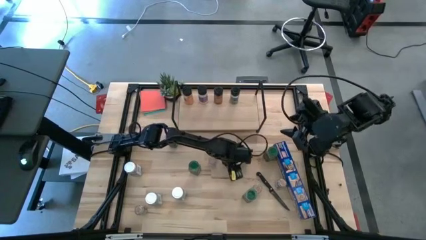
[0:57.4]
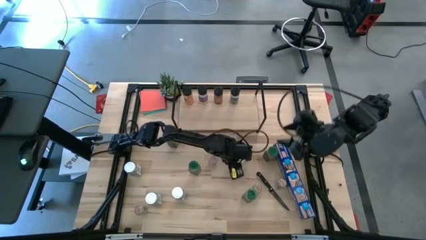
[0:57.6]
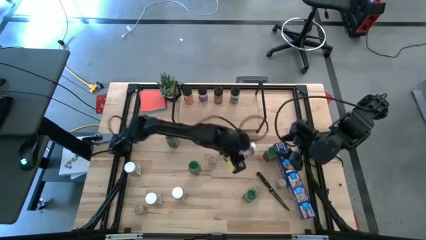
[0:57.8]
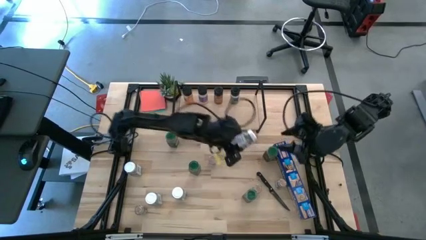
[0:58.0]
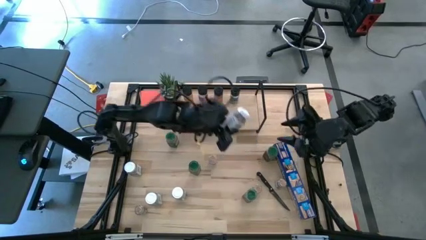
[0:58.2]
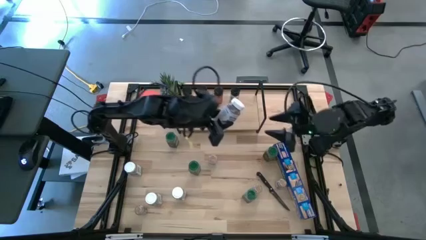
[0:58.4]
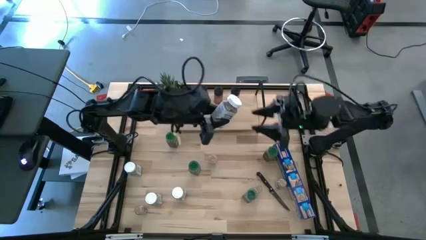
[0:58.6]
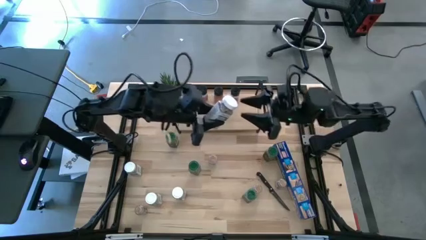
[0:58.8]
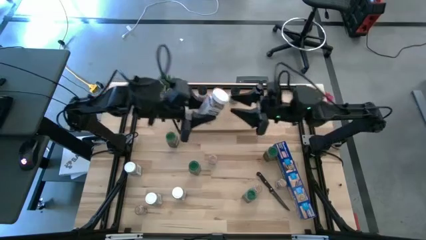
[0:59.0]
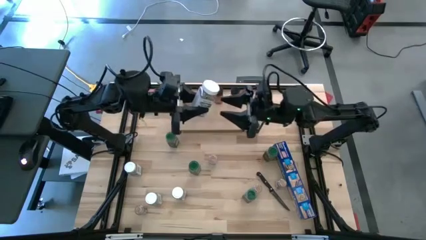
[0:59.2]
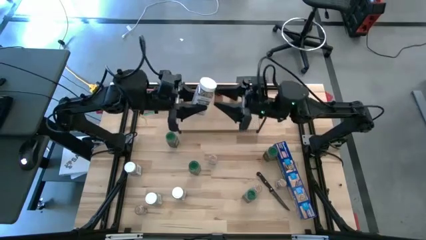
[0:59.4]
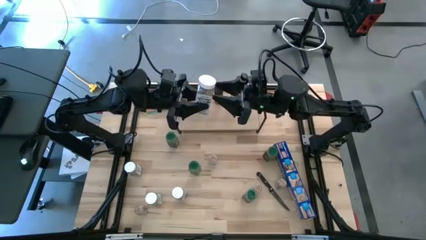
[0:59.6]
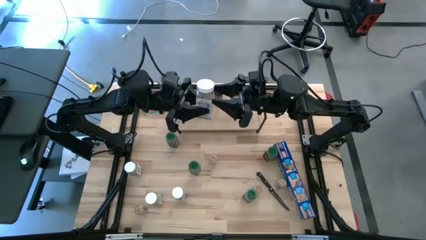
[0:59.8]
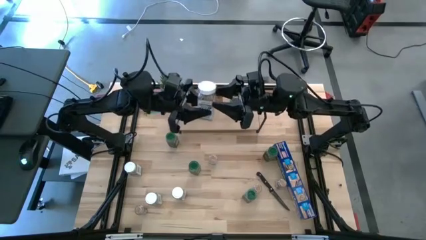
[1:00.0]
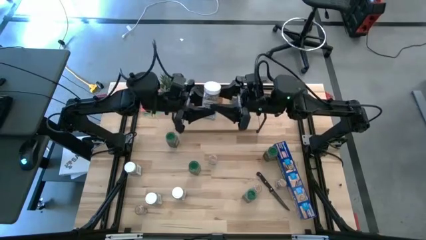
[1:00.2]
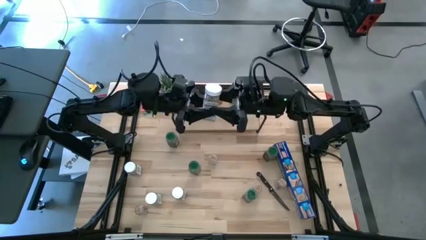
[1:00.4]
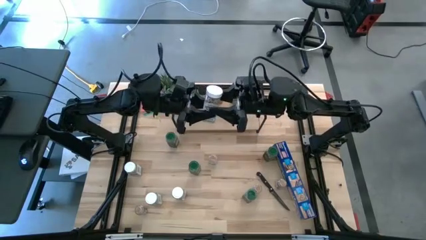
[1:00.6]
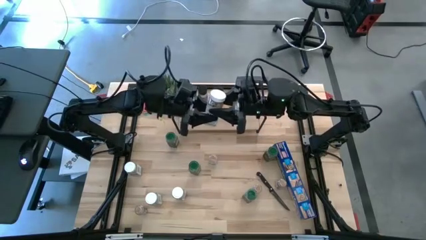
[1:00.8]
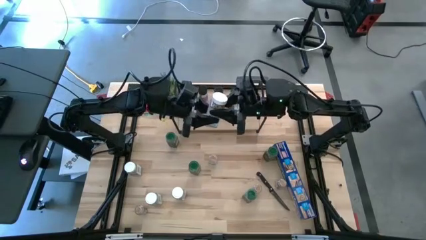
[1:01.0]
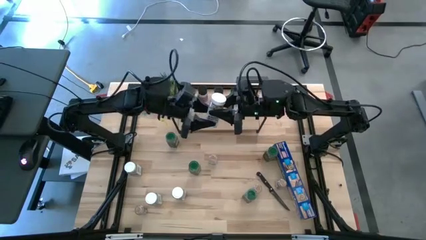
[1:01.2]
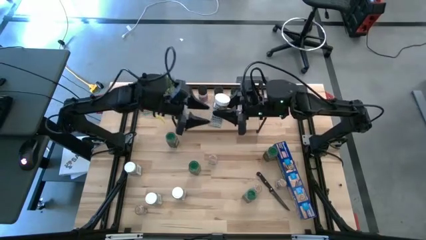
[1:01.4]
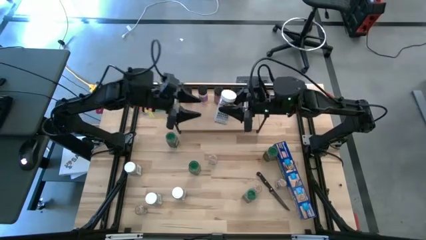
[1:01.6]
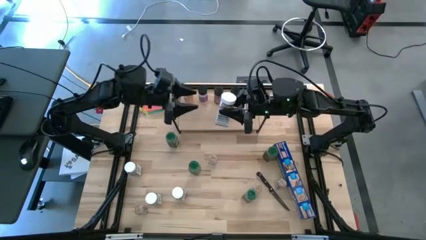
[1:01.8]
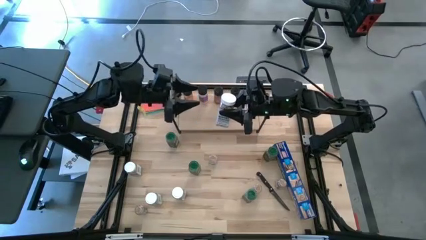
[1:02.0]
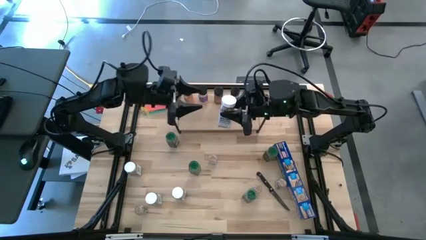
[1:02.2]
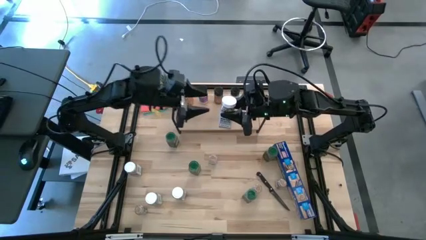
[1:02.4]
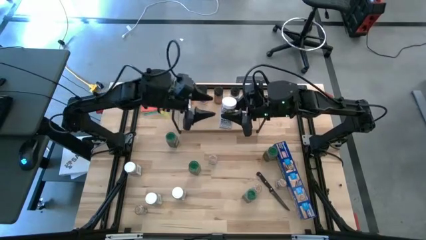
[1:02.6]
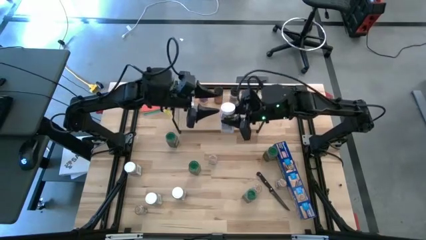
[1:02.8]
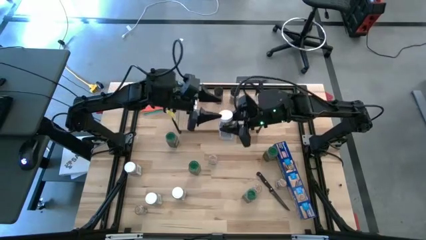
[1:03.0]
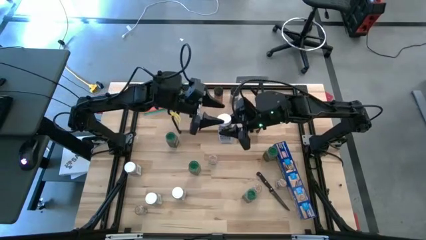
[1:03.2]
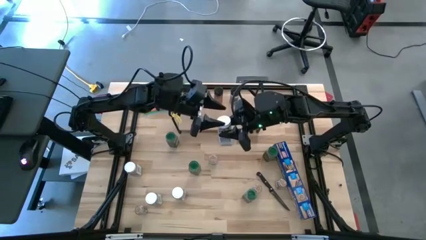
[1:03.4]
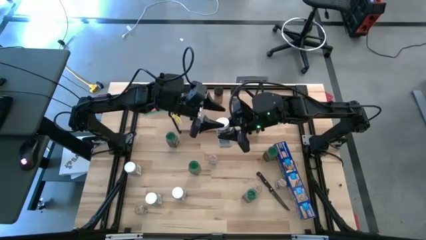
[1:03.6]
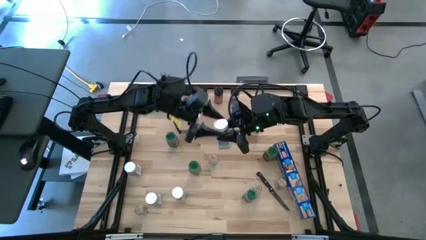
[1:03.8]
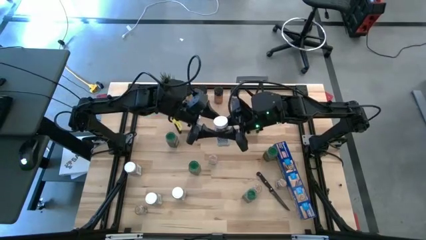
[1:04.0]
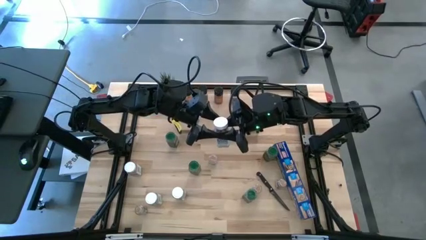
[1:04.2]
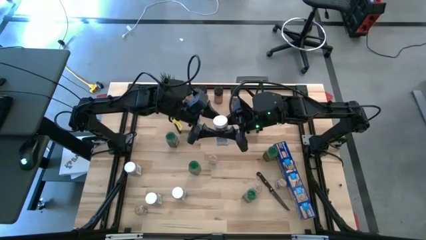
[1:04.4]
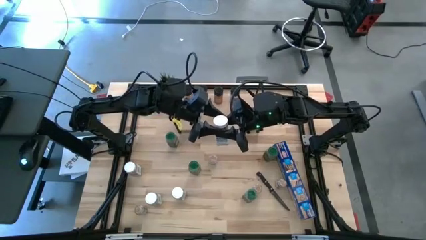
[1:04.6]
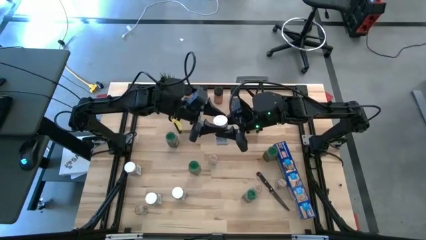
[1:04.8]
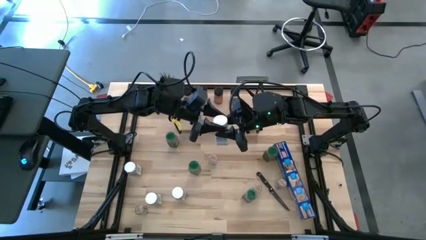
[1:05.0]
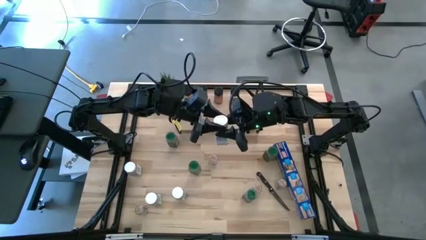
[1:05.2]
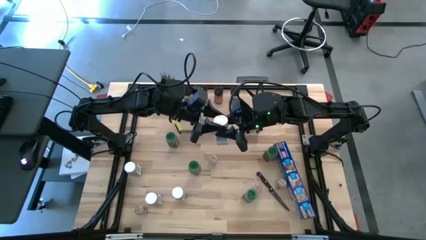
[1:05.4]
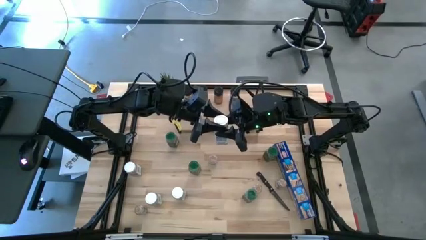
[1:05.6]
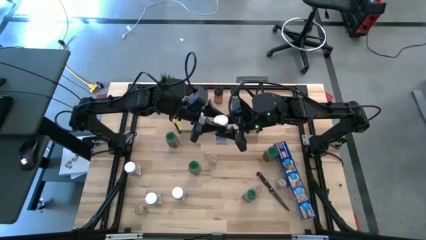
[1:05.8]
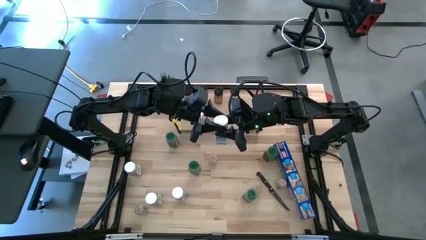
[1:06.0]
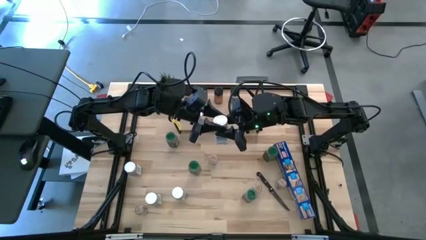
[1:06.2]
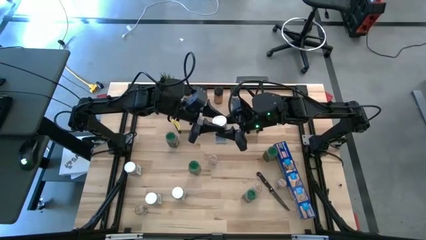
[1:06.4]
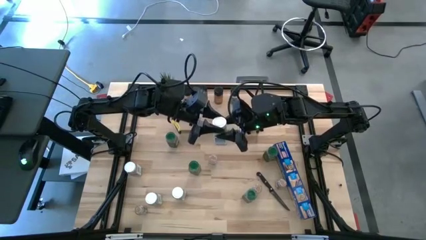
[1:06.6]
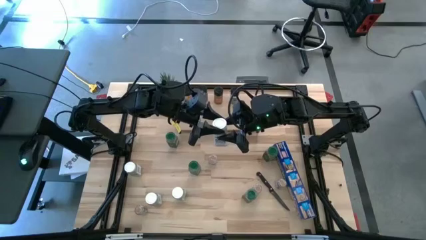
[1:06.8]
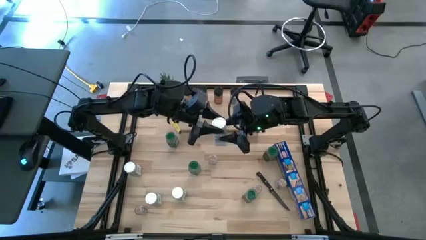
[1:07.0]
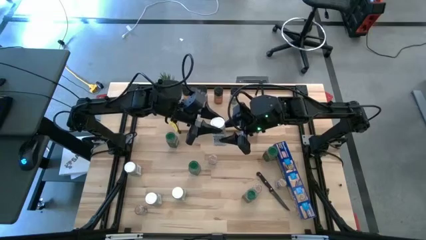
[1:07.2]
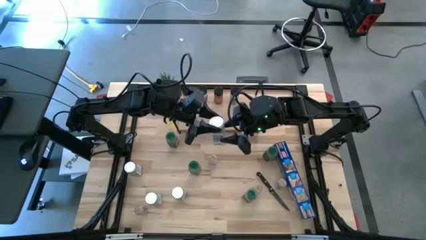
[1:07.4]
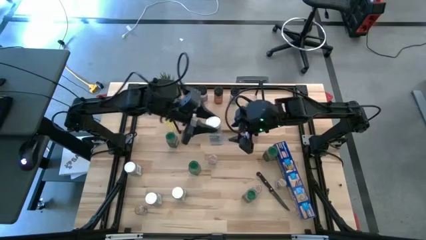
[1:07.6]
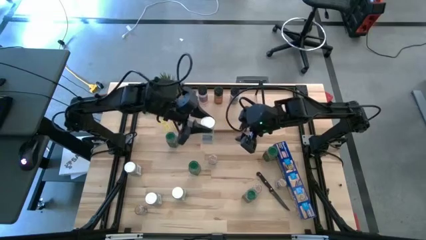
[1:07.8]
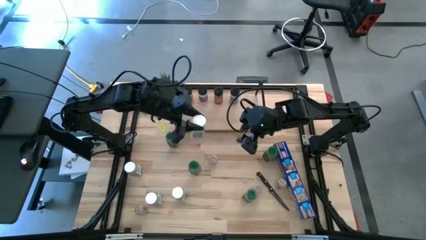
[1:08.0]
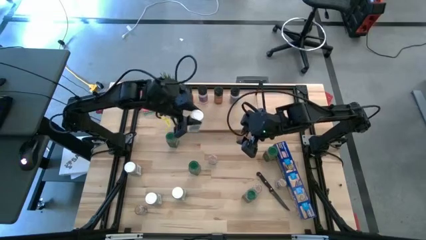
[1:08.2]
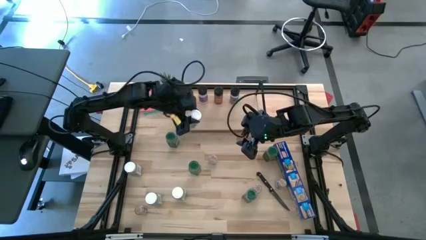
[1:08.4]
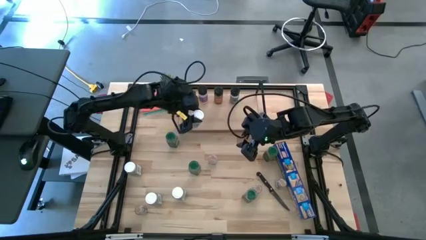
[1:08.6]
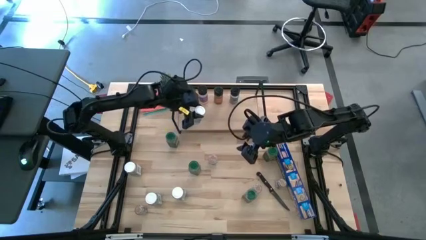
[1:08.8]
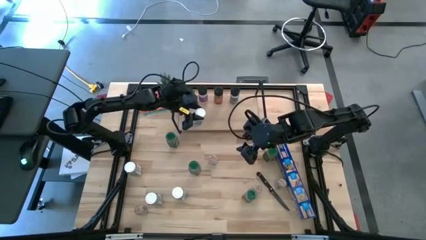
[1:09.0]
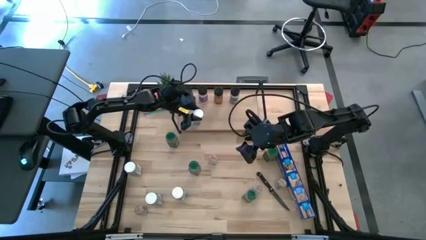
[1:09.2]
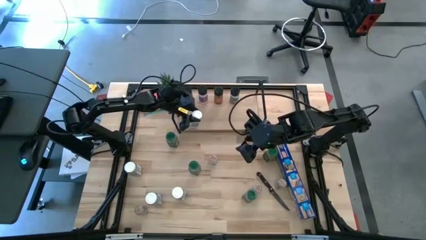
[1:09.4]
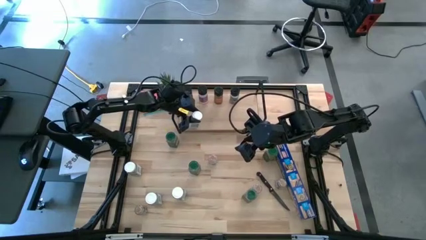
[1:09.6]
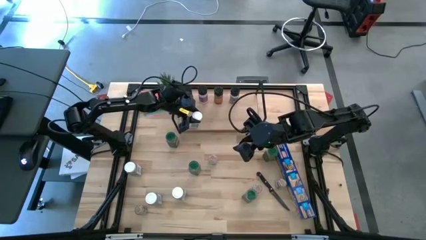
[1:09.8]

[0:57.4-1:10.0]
Task: Shelf spices
Put the white seasoning bottle on the shelf aligned with the black seasoning bottle
